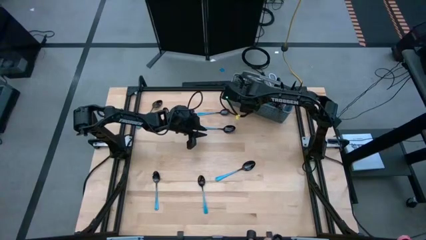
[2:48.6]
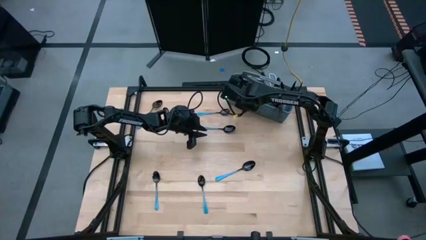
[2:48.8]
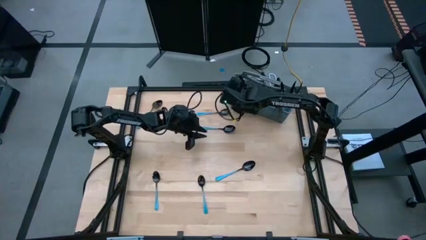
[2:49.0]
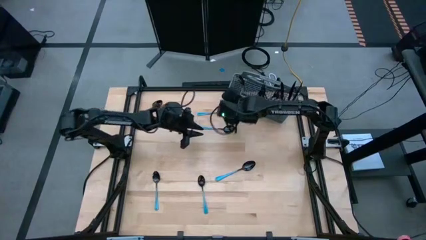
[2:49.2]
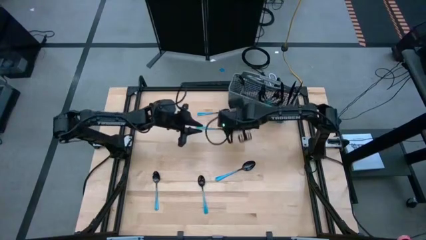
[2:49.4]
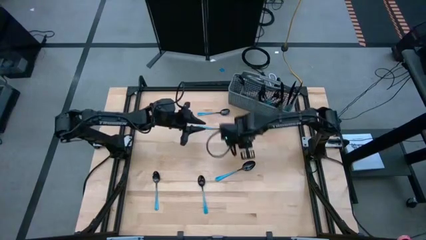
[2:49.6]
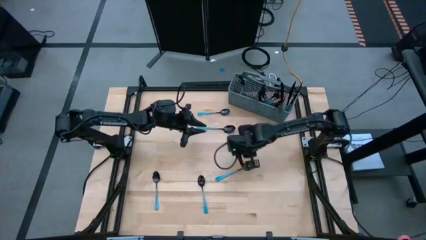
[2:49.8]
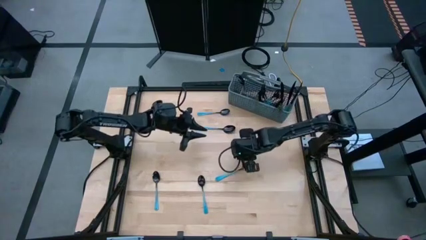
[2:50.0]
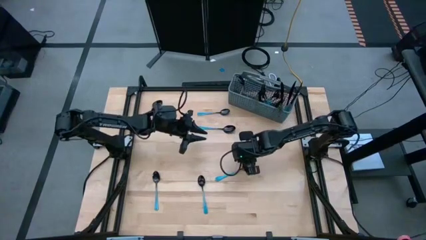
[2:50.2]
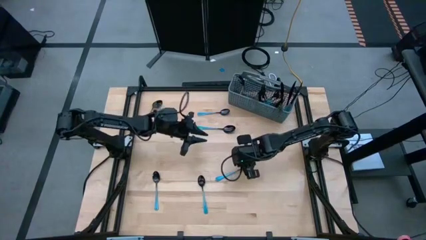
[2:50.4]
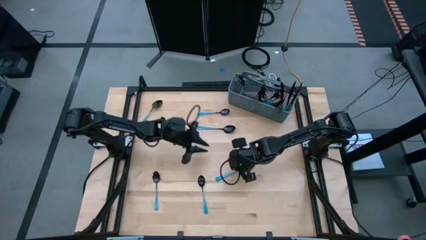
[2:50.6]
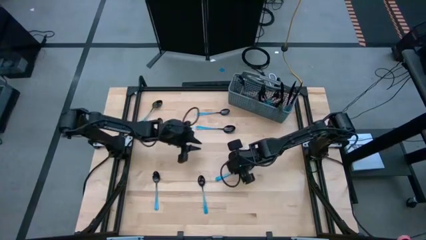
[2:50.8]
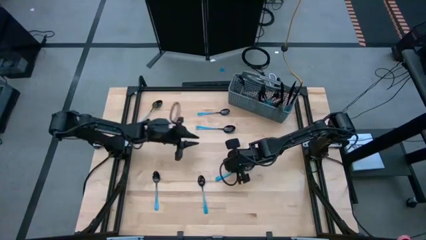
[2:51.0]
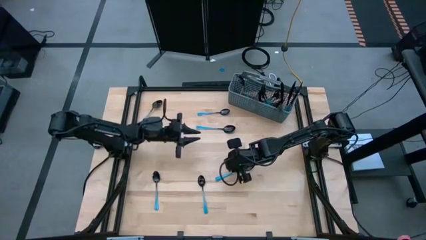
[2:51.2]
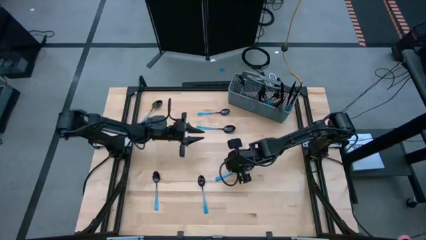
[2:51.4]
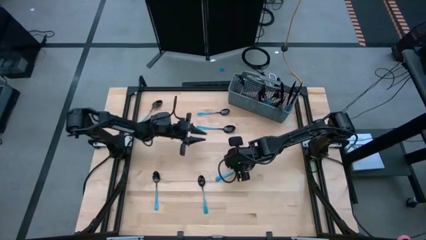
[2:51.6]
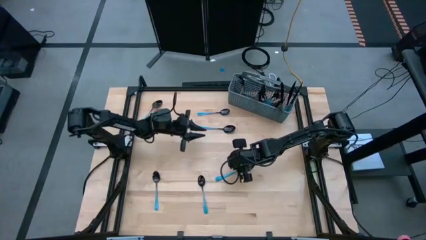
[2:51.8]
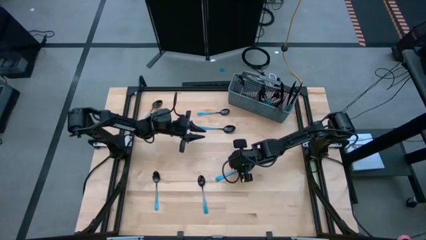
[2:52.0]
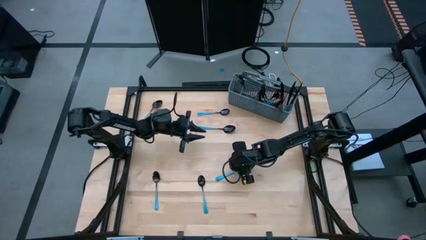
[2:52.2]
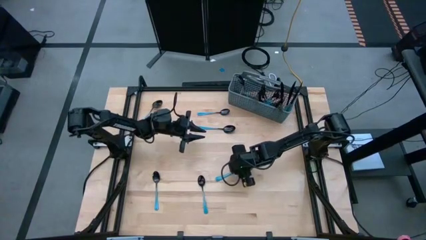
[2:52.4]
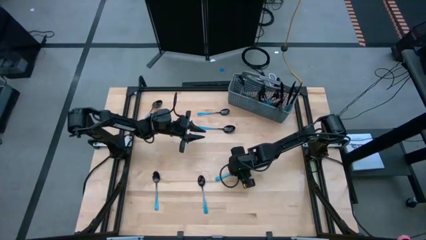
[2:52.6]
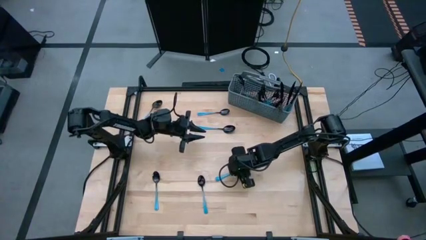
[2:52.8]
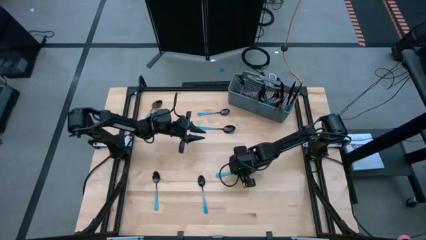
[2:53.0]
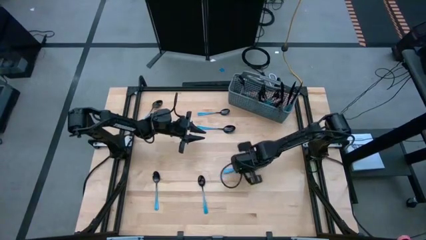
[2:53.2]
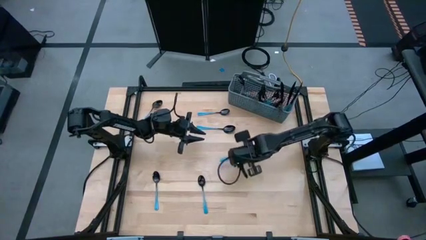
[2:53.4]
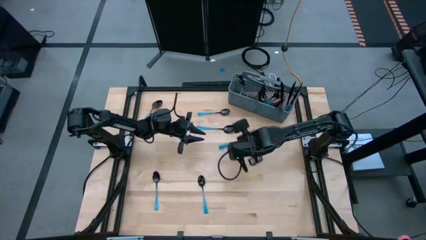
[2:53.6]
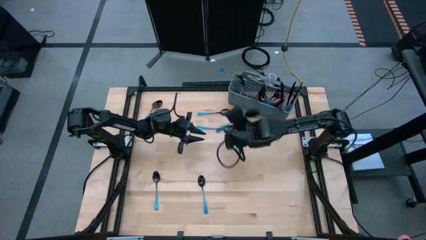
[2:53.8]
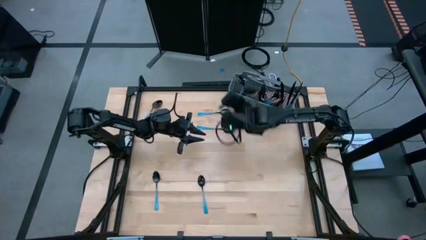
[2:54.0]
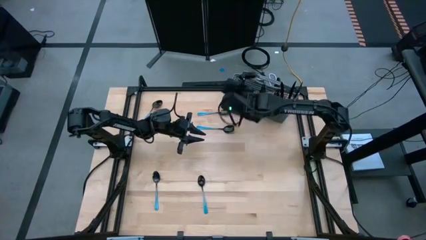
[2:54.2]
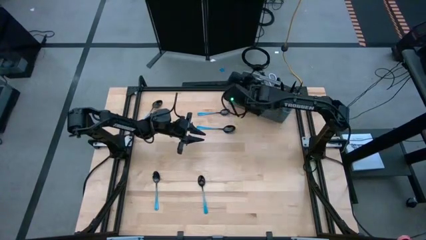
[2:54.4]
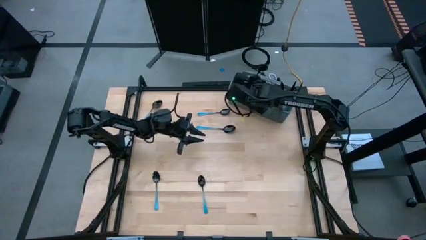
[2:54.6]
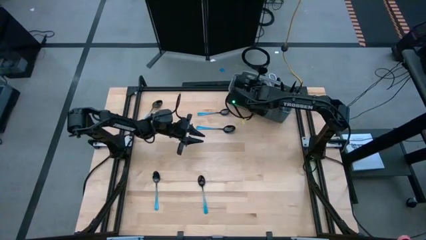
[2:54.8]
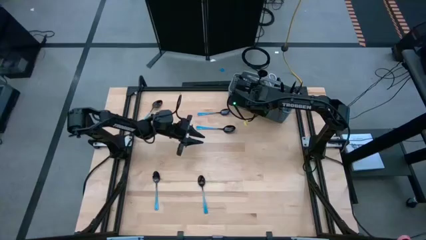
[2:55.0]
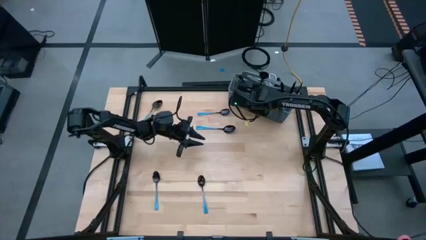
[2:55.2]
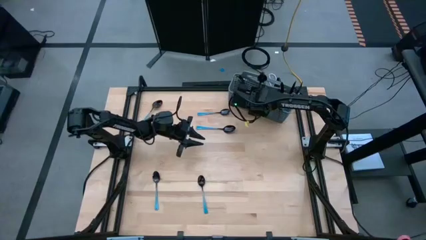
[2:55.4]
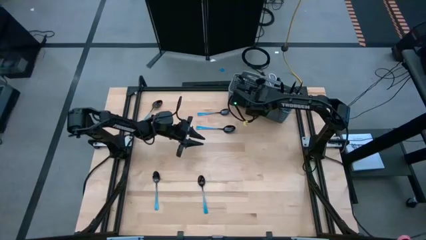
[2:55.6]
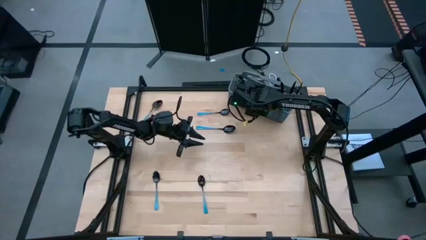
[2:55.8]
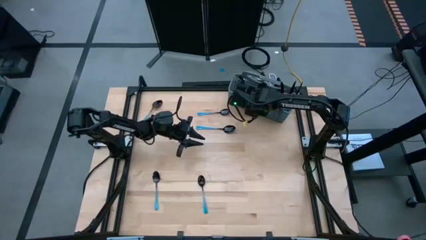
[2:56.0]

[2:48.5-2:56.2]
Task: Sort silverware
Put the blue spoon into the left of the blue utensil organizer

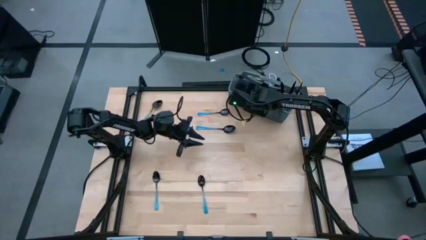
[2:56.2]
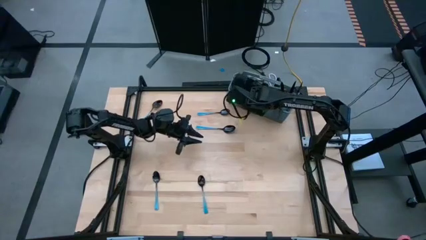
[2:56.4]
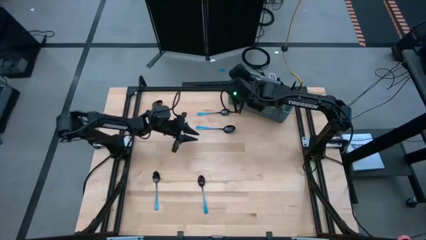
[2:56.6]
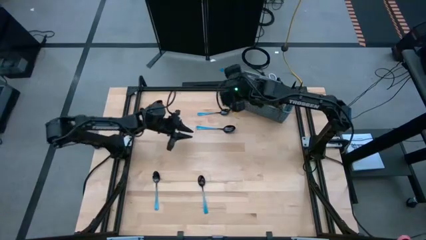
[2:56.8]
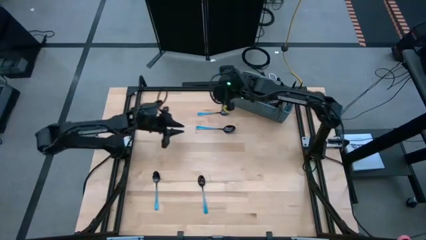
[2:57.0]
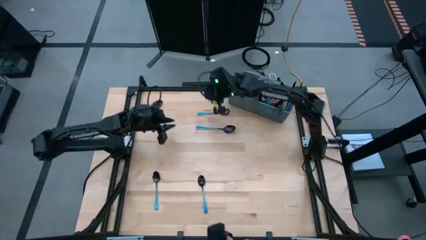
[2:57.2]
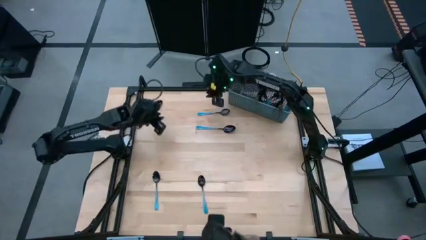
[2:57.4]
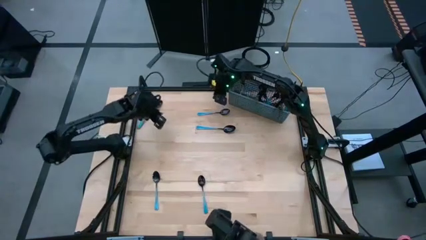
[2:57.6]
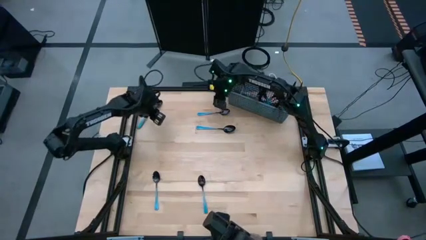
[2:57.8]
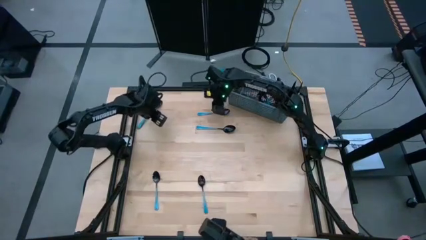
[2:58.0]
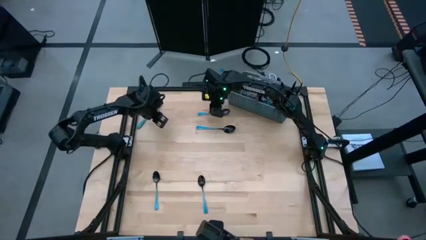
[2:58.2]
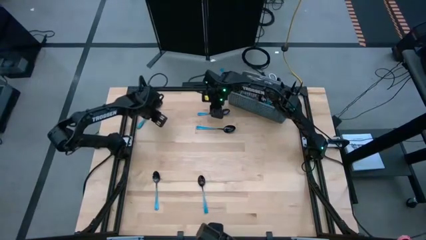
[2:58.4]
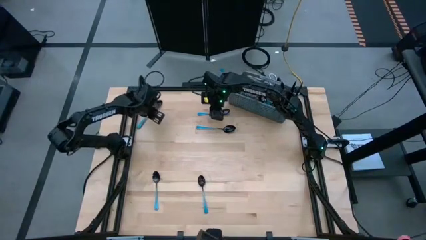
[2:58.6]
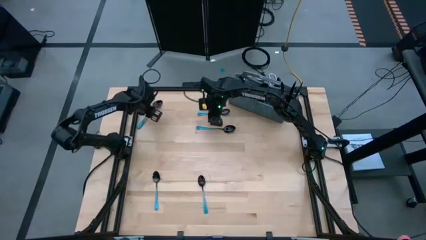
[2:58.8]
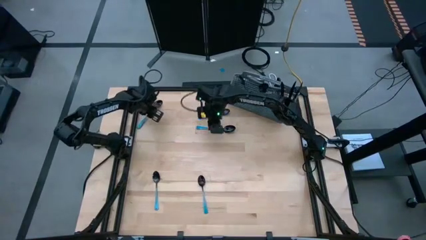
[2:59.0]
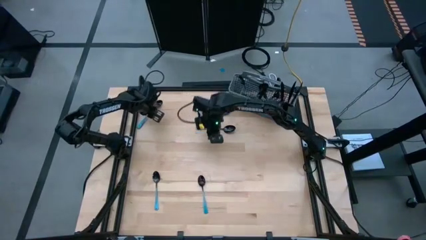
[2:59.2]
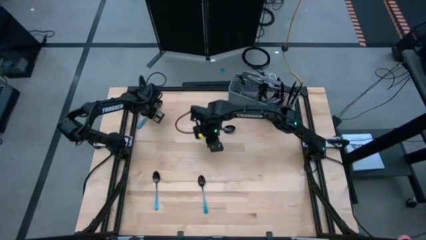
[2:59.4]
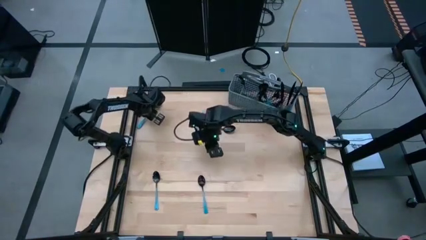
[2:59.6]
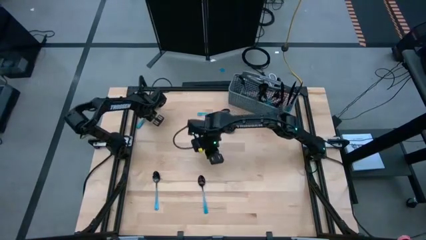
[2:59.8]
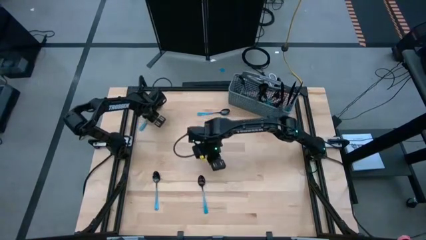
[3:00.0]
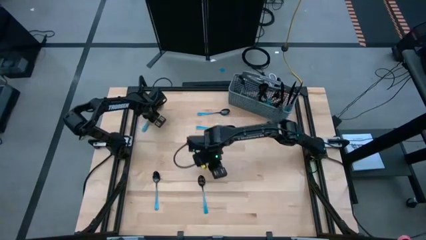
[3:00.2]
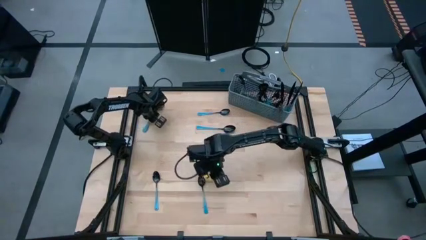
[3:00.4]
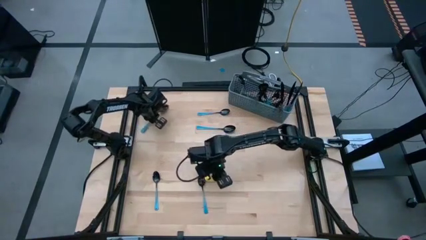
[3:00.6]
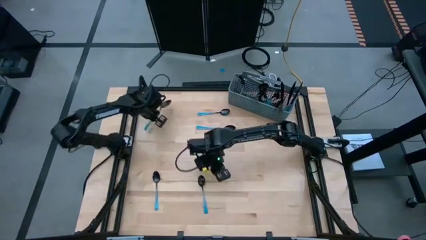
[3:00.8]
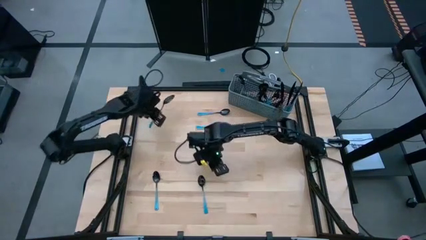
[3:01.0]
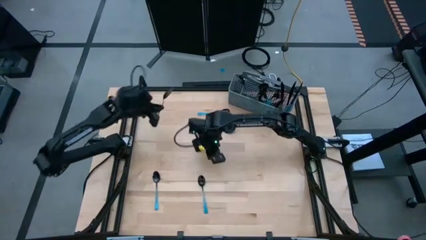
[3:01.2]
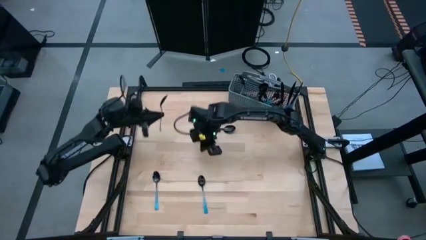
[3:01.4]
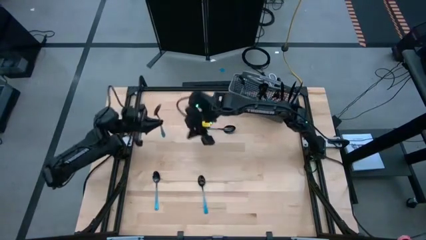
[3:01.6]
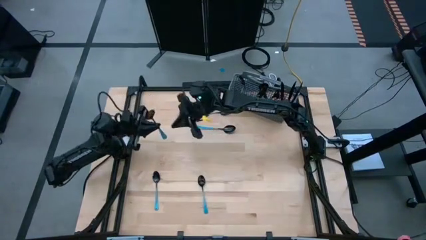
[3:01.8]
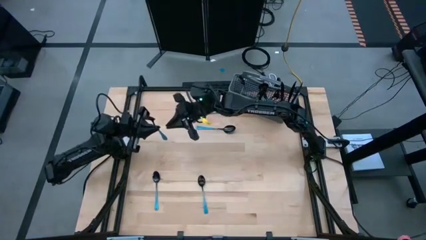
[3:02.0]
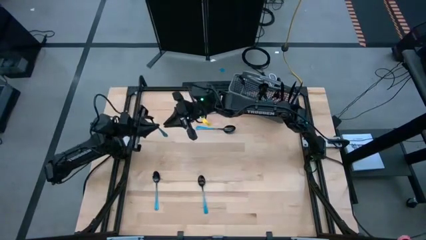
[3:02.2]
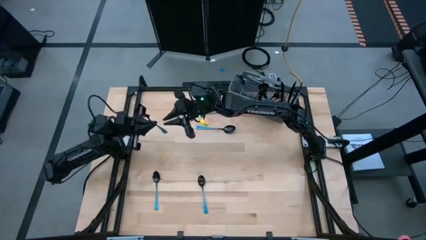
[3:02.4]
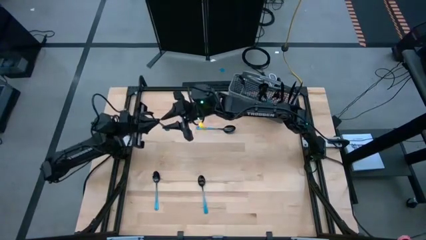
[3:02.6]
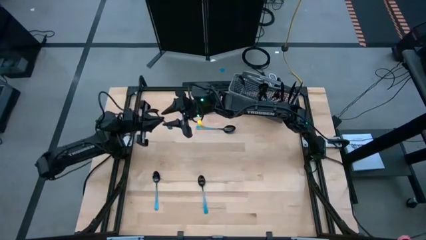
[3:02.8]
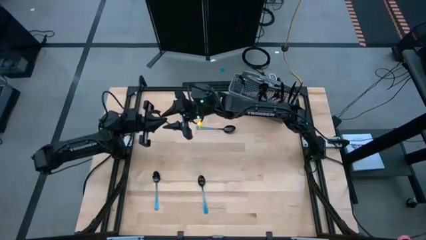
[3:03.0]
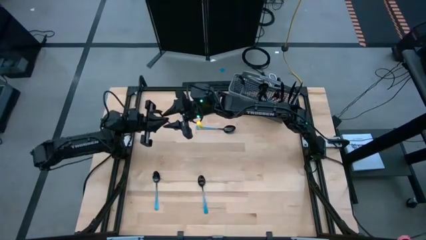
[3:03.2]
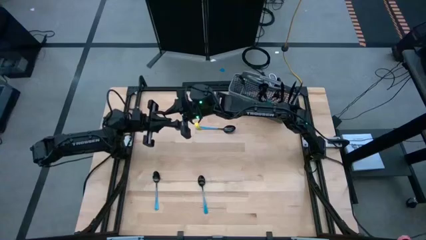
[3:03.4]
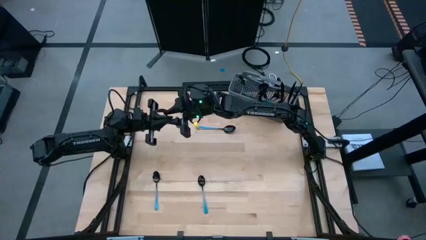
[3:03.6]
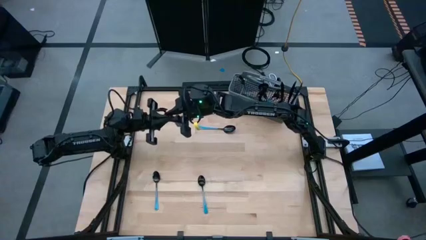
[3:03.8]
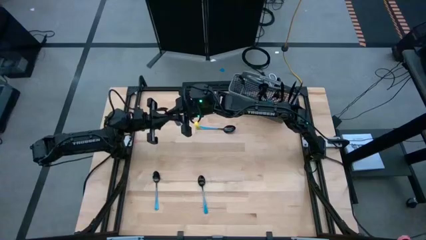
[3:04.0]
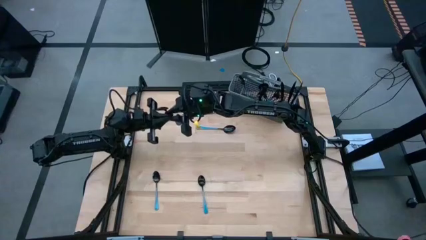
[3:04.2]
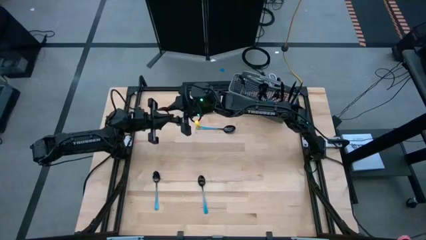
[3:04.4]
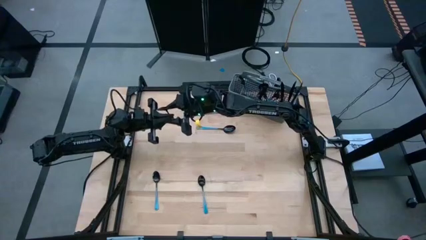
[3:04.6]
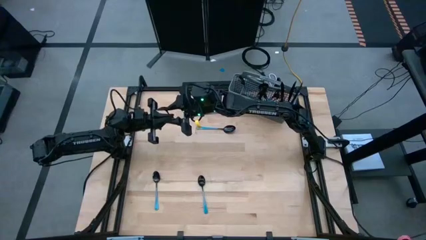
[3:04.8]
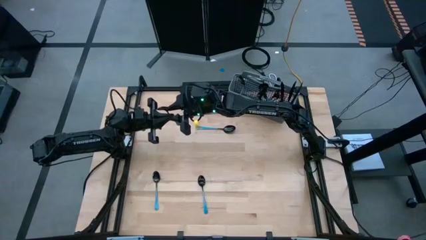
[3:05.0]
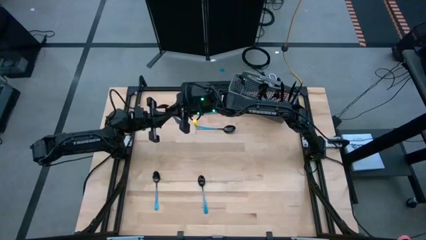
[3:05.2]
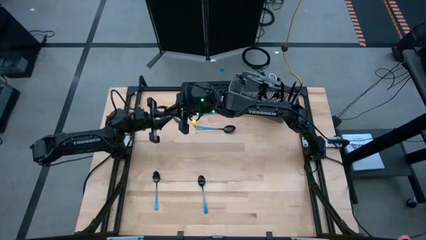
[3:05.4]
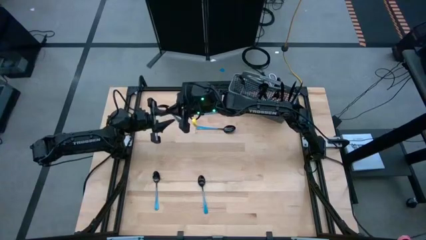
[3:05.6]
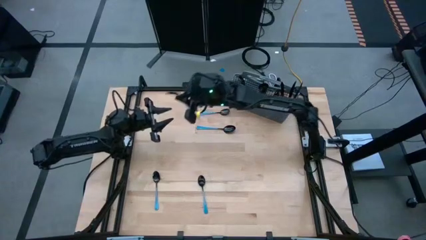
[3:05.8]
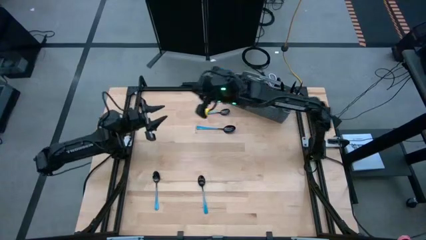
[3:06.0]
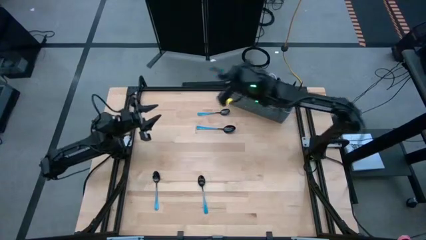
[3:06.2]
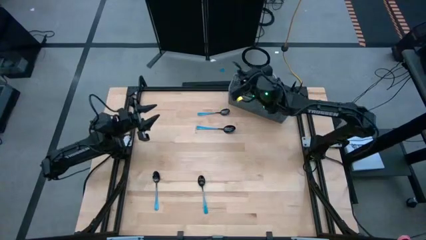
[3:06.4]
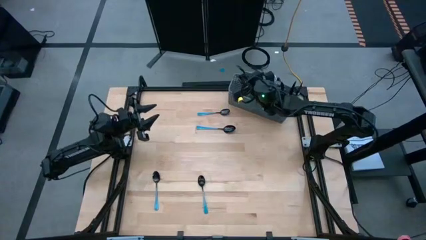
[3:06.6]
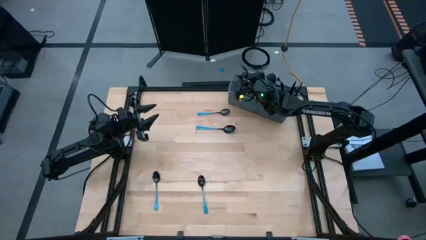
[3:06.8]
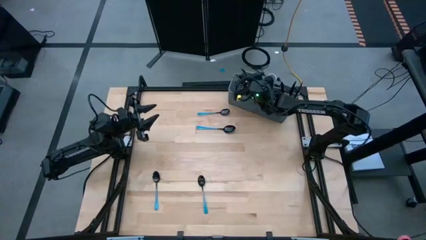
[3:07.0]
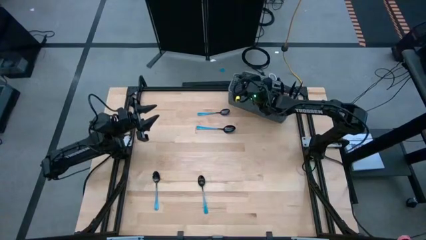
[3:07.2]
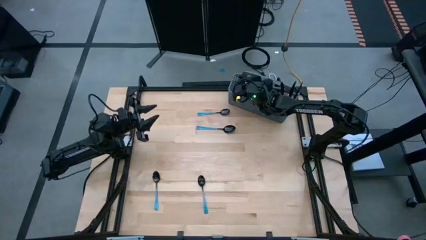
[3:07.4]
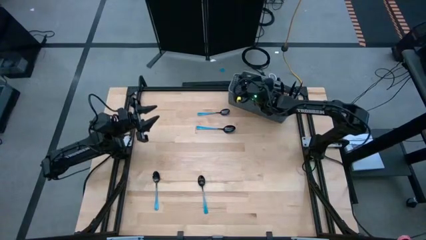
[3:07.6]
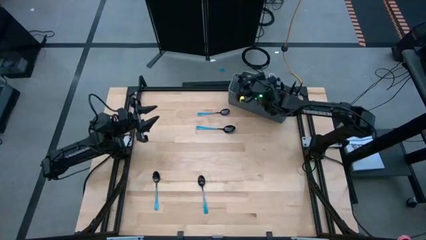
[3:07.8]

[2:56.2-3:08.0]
Put the blue spoon into the left of the blue utensil organizer
